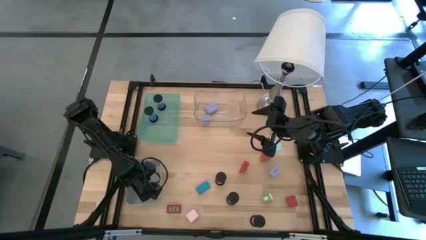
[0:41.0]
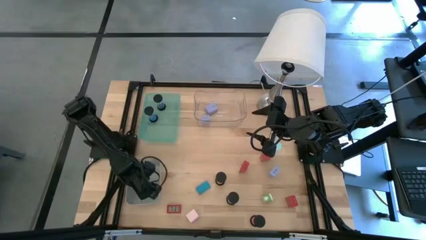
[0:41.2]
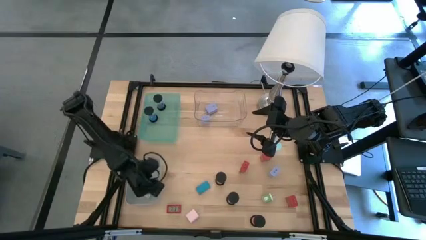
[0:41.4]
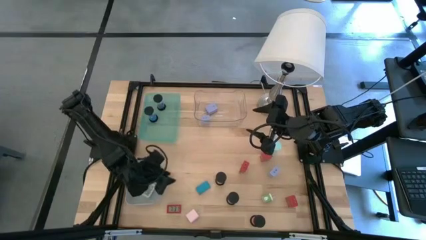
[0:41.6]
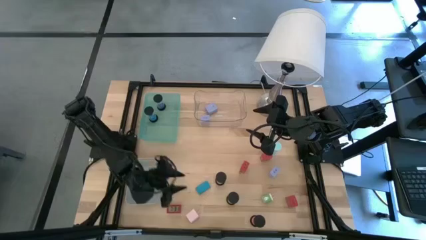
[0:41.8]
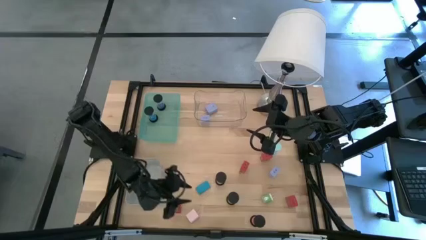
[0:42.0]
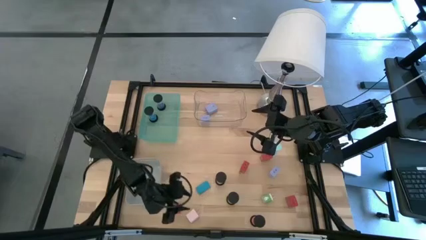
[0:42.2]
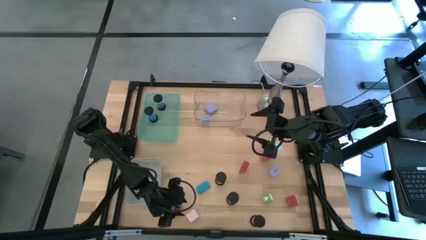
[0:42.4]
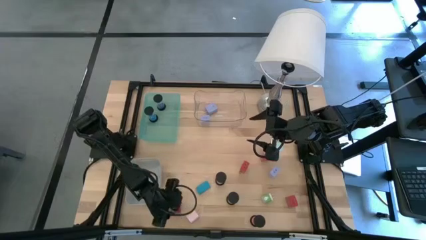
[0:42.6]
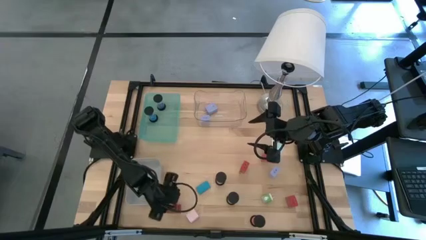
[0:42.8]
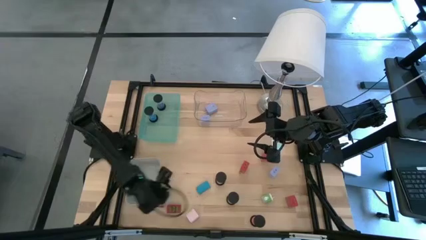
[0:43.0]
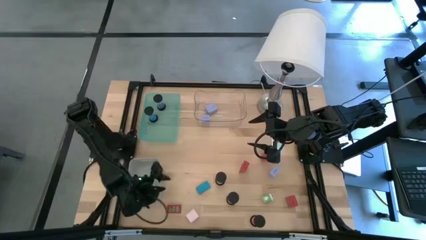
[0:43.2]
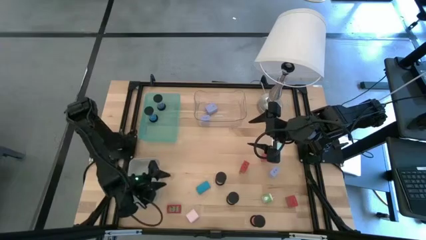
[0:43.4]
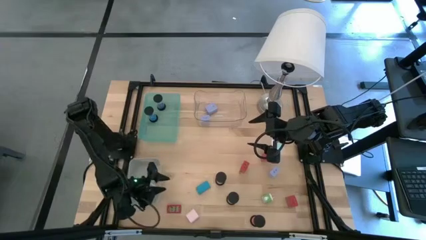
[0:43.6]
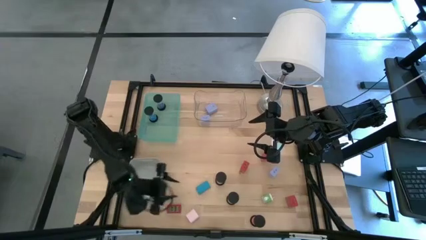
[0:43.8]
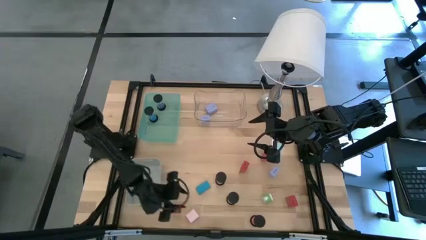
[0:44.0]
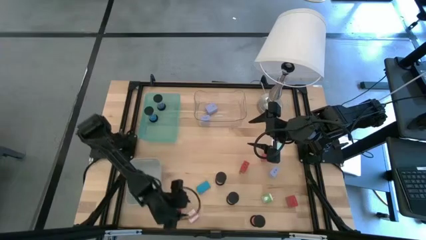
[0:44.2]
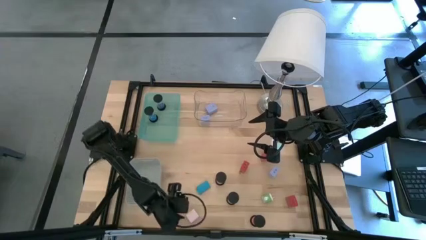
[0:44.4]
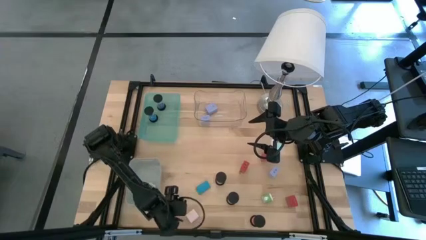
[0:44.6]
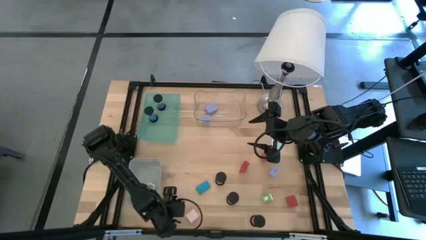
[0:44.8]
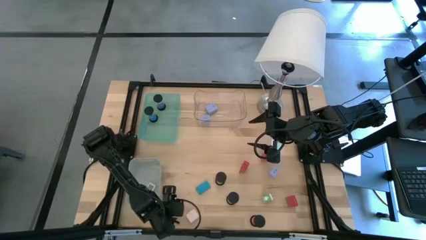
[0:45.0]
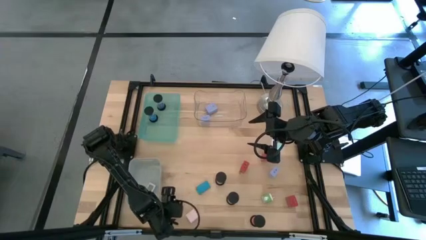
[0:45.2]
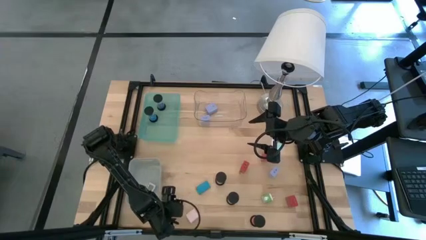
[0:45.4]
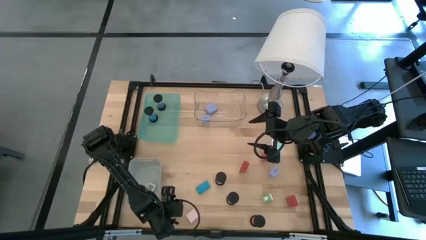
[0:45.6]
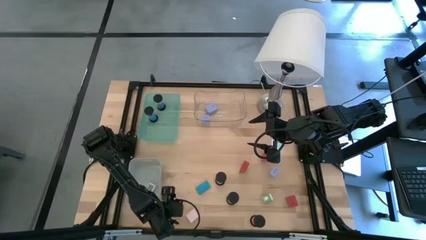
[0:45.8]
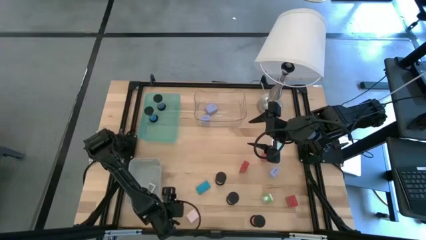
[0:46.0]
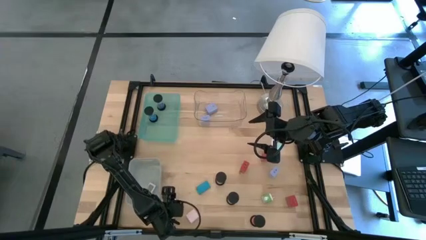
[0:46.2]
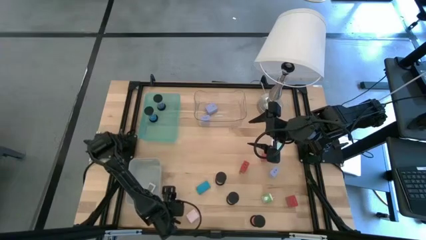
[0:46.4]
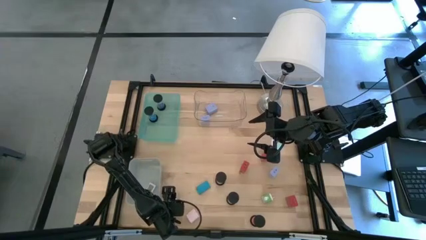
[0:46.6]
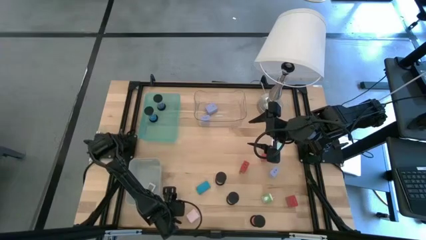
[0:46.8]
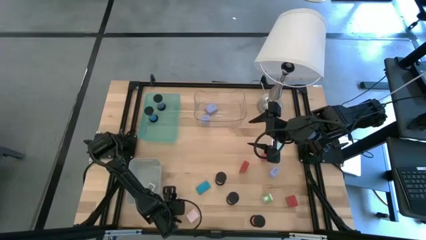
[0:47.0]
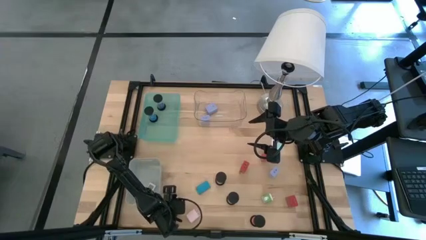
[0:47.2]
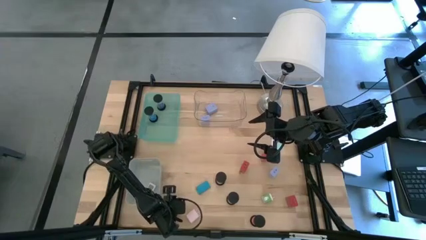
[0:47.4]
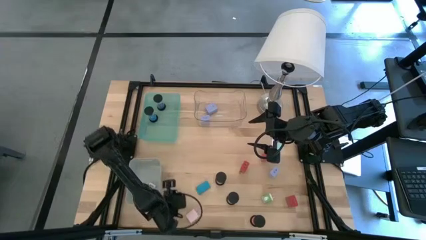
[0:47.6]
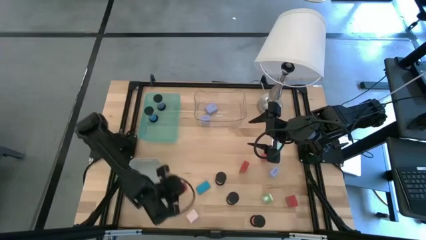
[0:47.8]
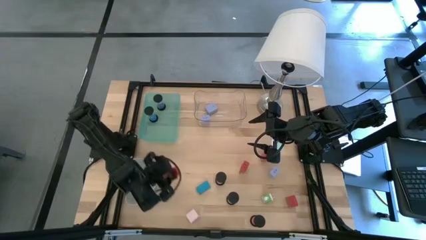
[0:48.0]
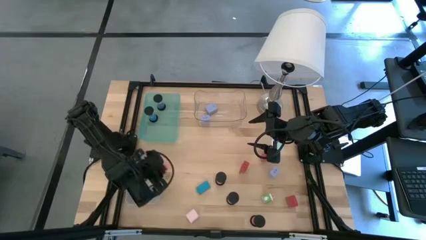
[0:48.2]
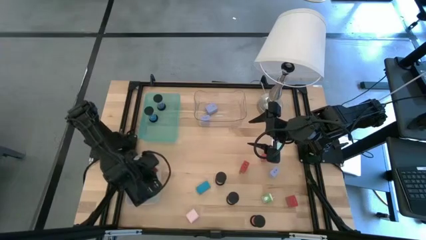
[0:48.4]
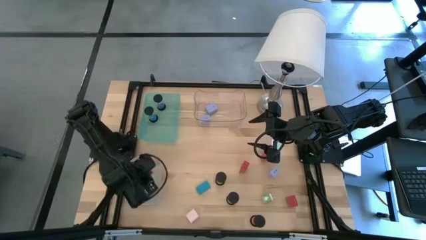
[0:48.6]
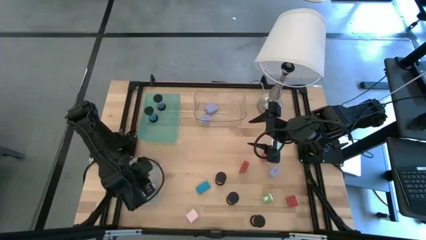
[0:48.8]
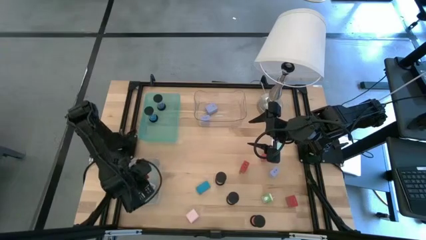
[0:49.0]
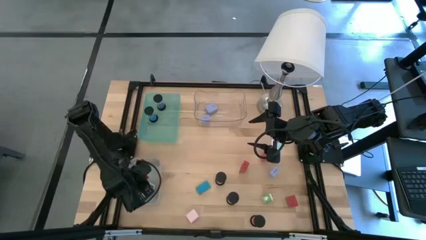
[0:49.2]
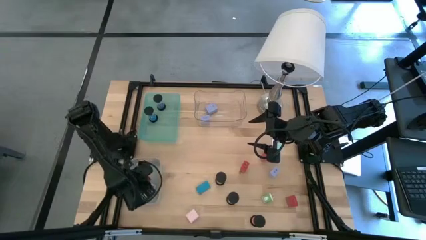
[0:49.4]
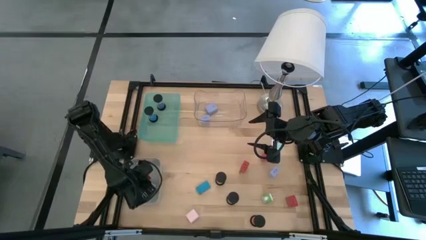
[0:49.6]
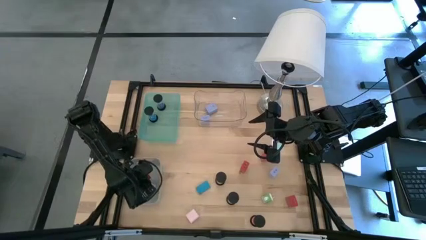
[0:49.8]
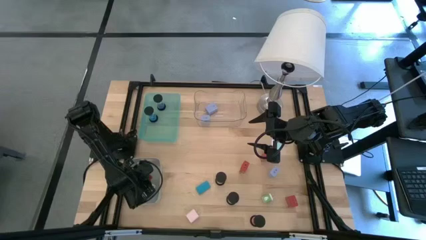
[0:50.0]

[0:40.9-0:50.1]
Task: Pick & Place Office items
Put the red digital timer into the gray bin

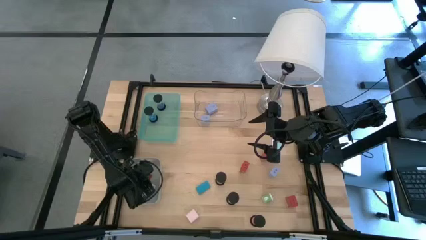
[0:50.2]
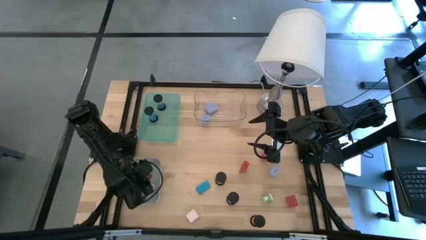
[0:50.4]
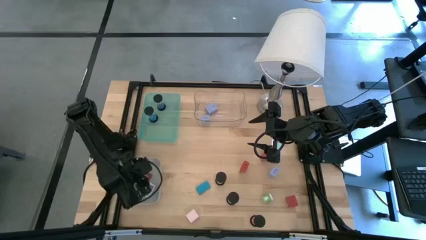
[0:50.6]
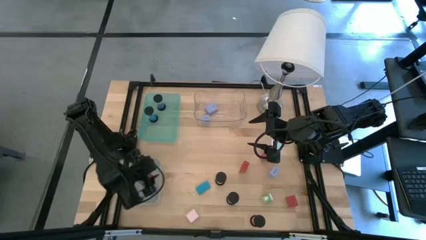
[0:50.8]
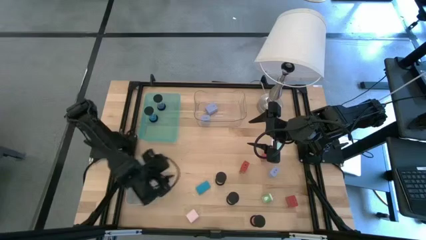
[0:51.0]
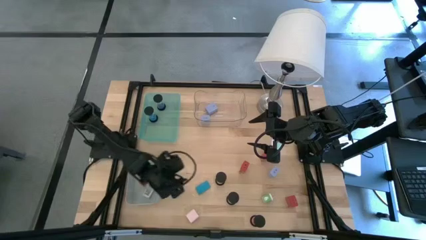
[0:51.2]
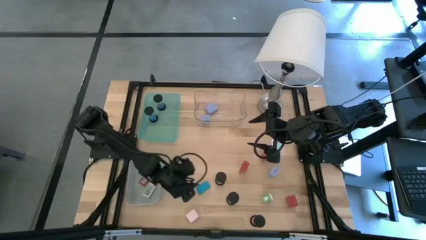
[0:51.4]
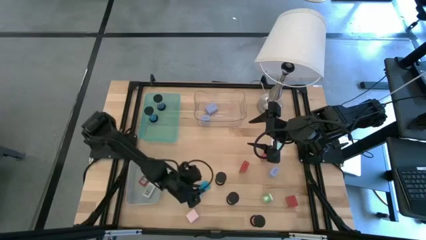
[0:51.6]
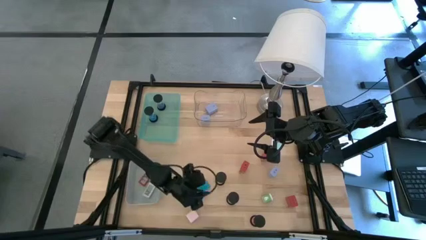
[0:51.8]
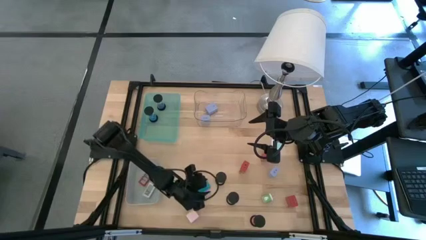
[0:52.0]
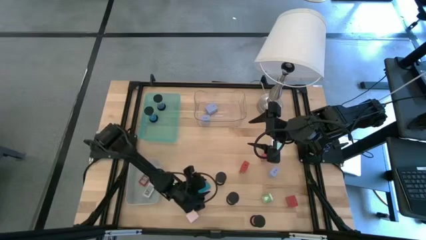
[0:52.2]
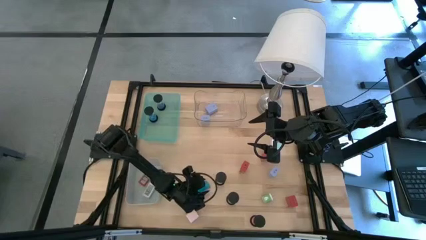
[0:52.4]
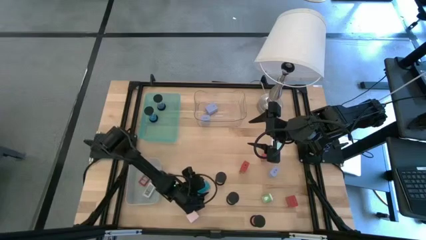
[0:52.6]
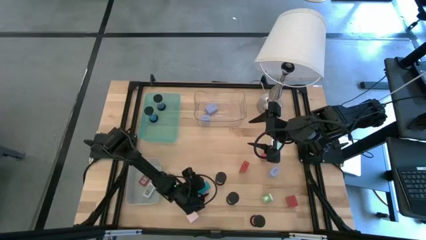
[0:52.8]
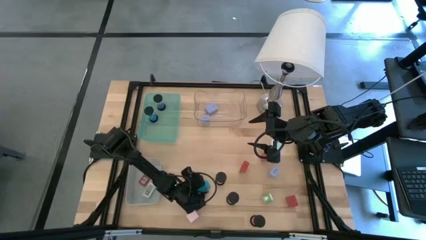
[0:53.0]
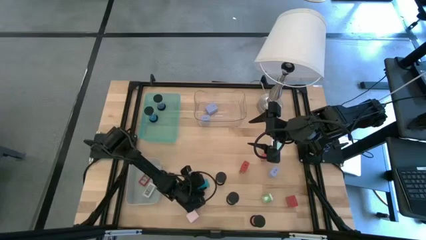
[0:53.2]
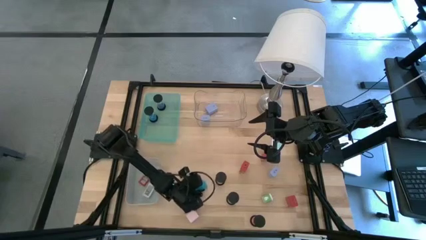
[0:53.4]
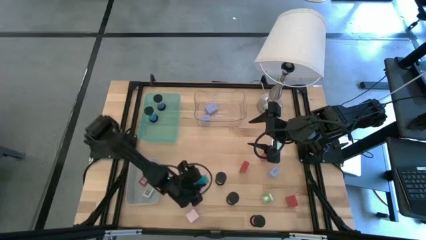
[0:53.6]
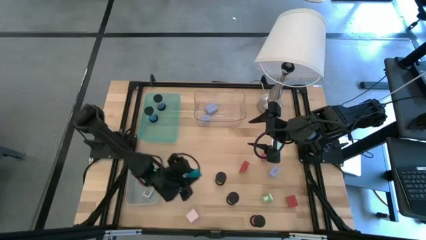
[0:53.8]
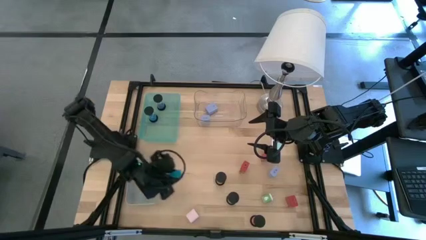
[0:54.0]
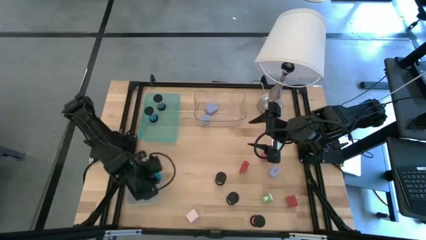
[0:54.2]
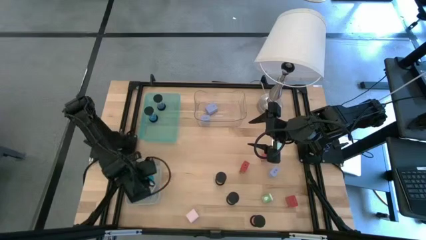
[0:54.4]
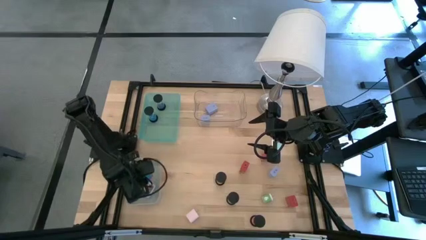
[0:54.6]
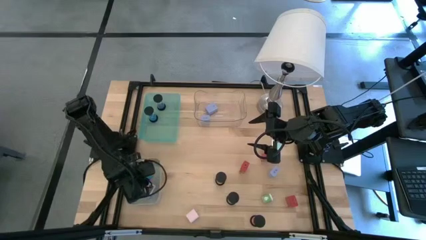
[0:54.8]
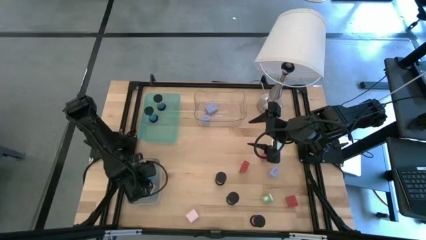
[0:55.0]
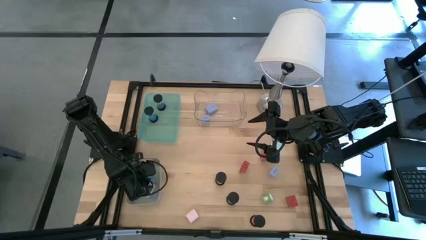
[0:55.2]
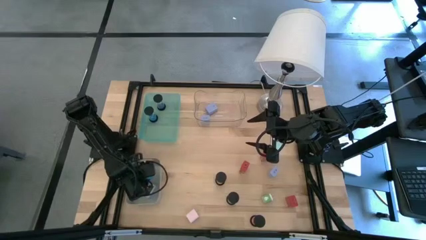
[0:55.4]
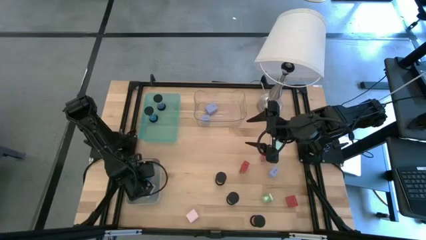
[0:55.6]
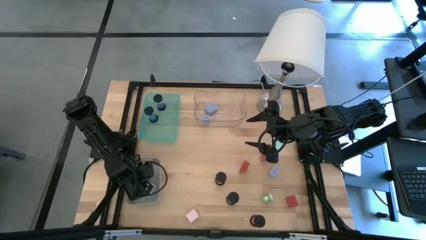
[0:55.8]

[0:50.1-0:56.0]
Put the blue digital timer into the gray bin

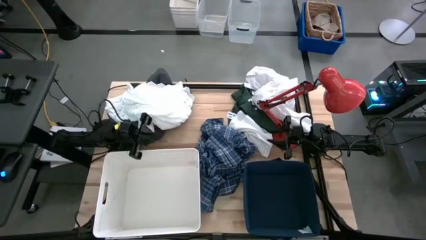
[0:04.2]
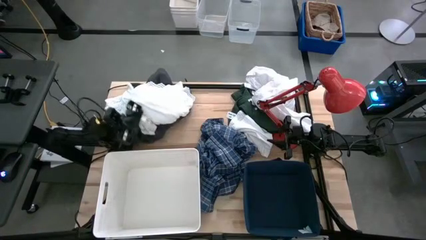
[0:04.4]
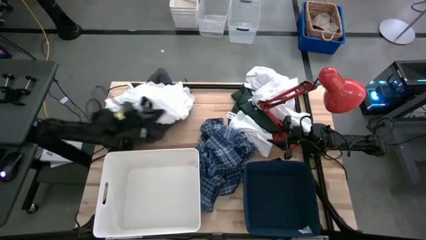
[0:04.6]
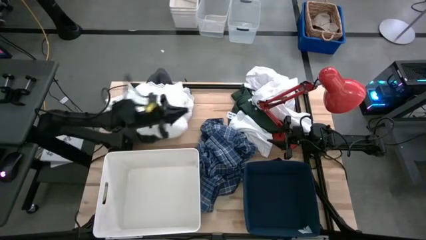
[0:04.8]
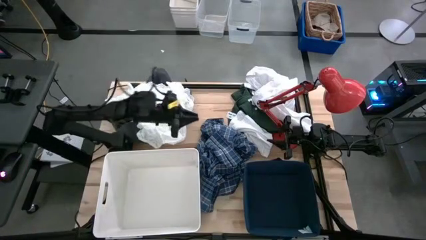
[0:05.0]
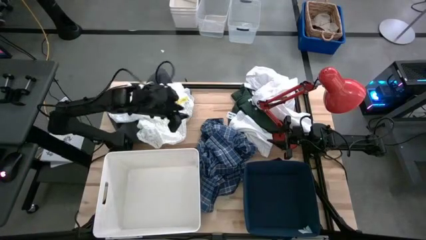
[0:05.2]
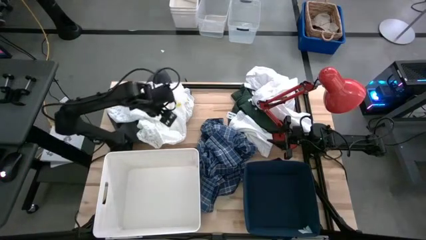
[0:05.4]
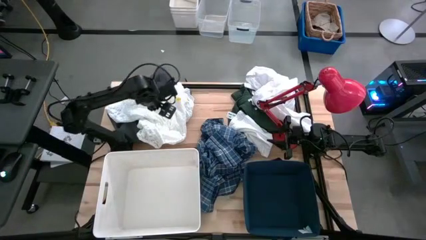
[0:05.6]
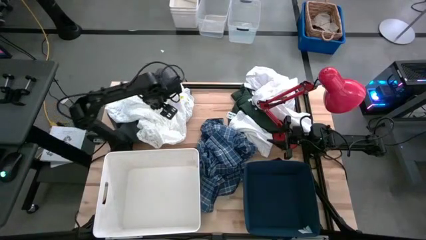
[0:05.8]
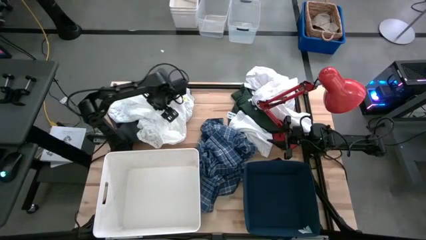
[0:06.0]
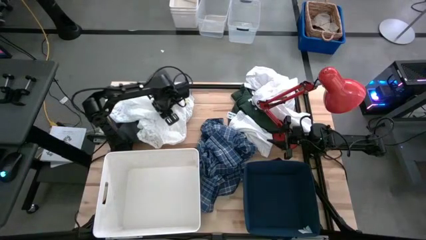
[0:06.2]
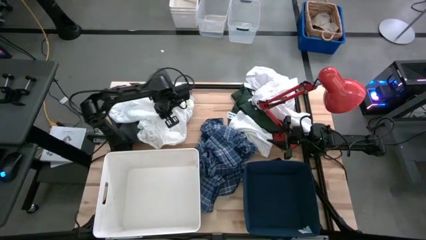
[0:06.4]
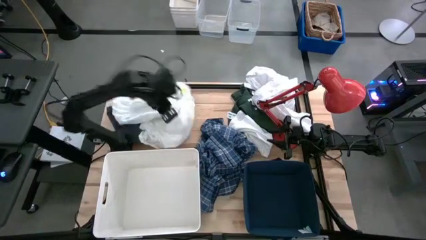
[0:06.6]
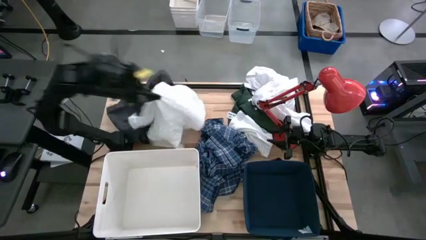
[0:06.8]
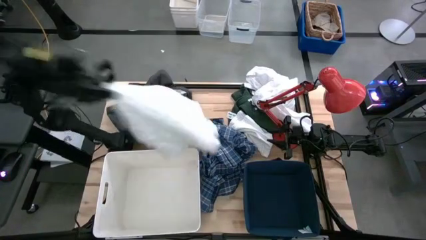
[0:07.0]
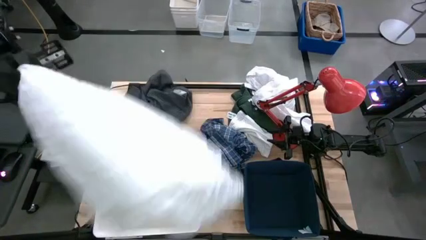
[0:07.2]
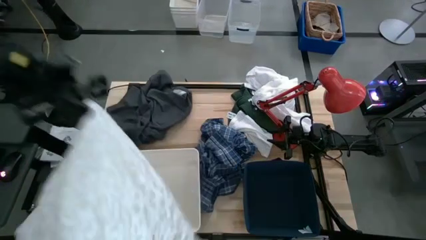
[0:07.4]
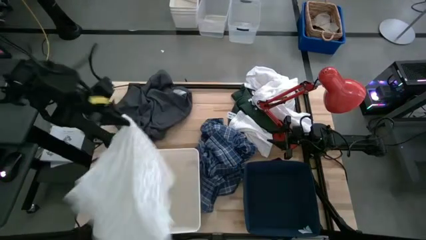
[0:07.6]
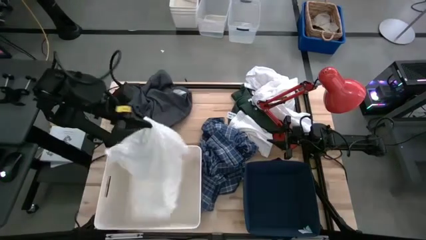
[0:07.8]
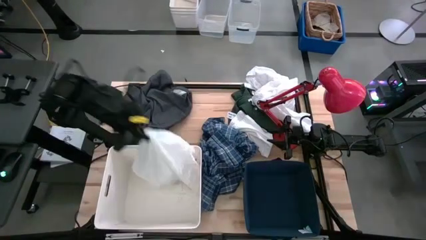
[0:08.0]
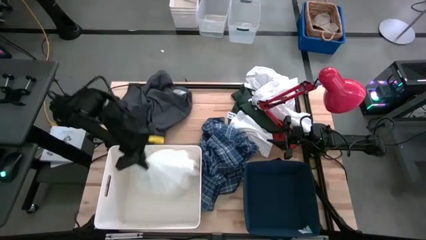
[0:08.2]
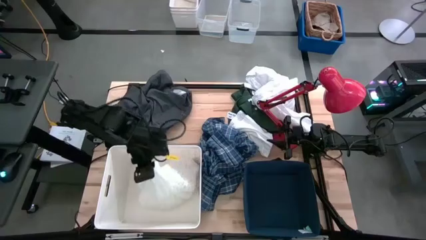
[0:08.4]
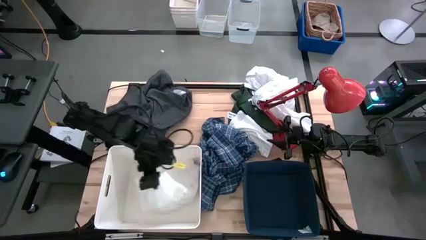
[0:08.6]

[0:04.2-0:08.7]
Task: Sort clothes
Put the white dress into the white bin
